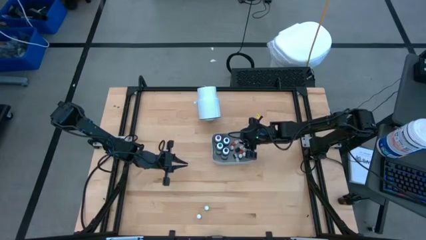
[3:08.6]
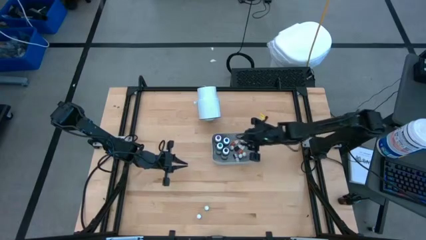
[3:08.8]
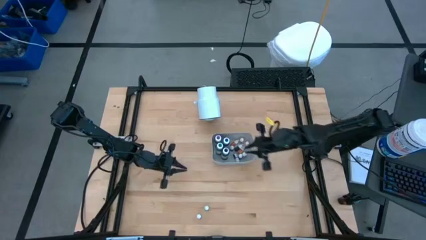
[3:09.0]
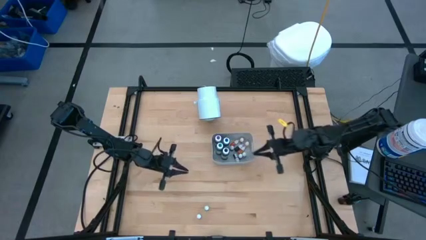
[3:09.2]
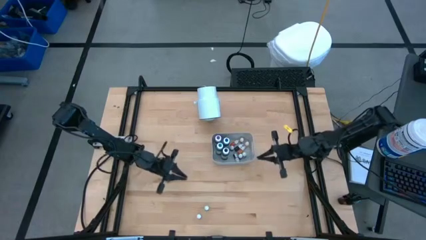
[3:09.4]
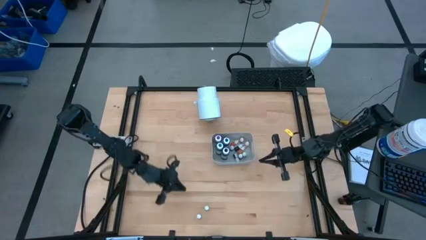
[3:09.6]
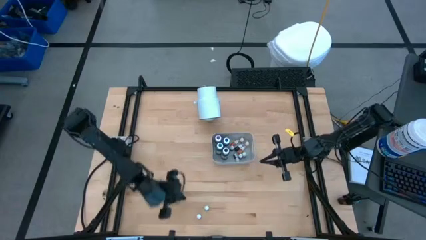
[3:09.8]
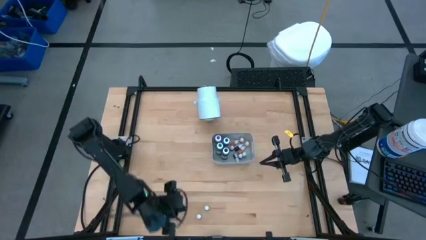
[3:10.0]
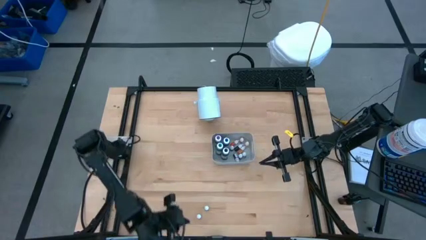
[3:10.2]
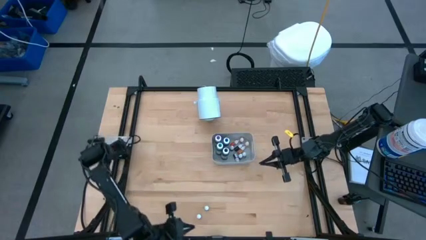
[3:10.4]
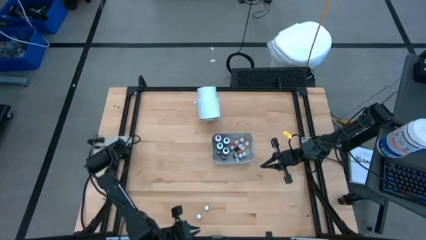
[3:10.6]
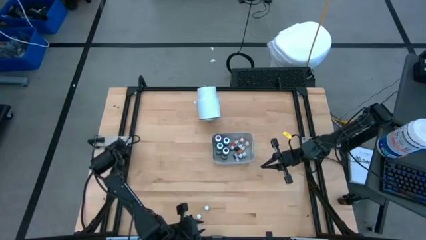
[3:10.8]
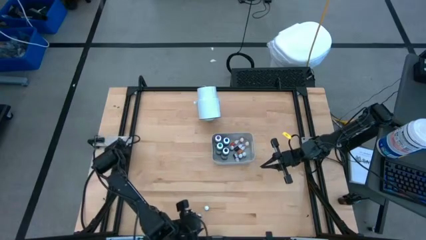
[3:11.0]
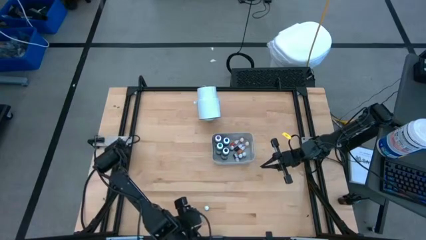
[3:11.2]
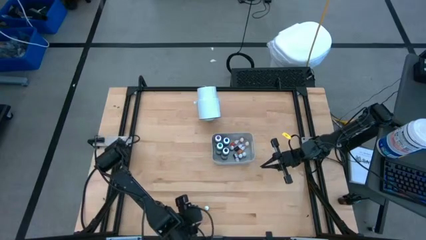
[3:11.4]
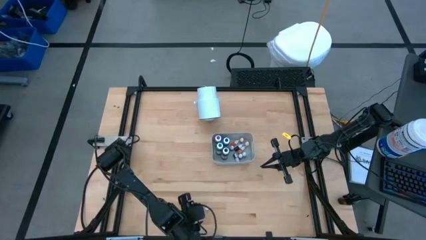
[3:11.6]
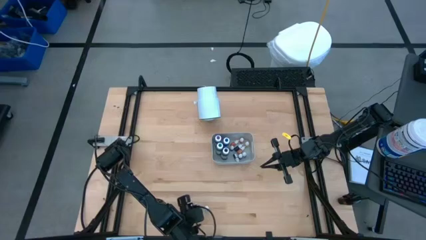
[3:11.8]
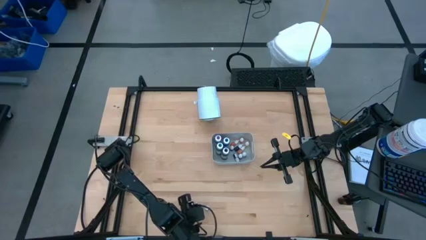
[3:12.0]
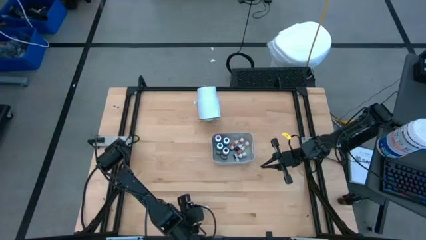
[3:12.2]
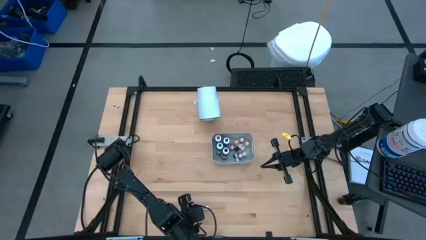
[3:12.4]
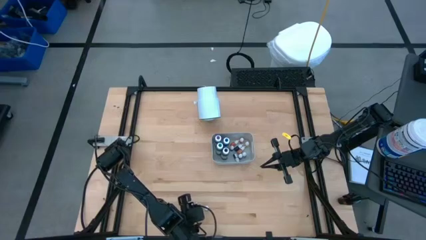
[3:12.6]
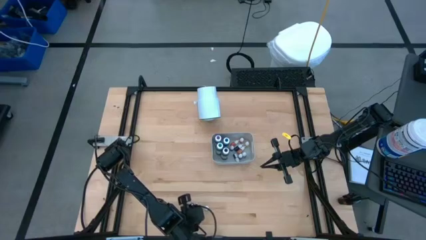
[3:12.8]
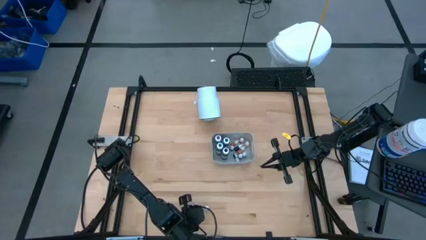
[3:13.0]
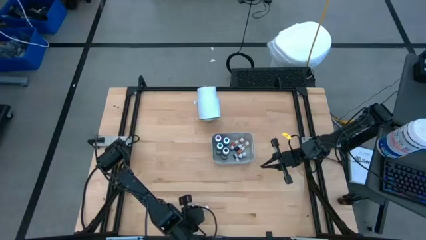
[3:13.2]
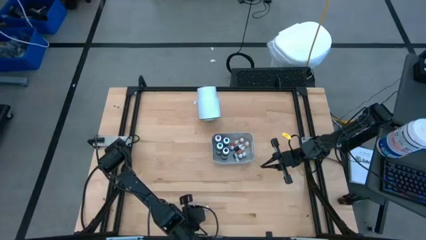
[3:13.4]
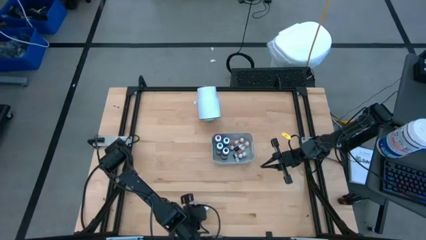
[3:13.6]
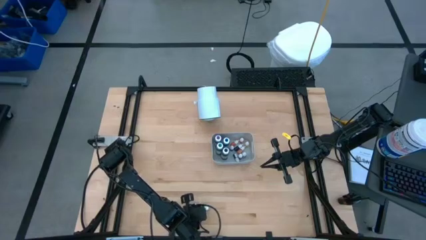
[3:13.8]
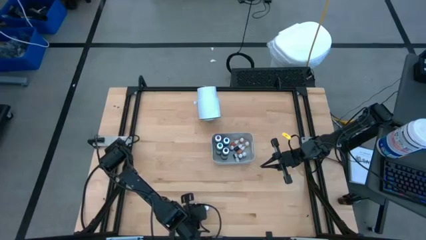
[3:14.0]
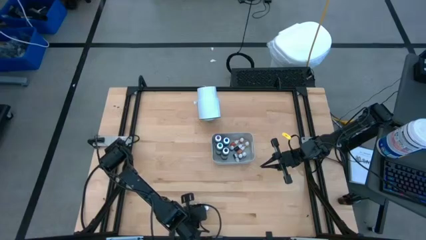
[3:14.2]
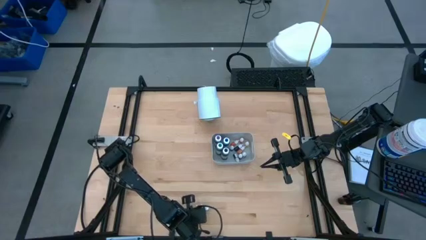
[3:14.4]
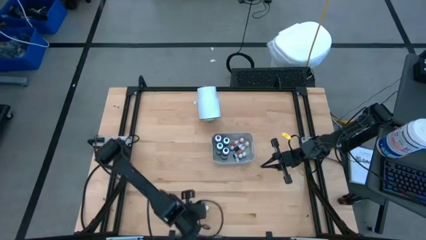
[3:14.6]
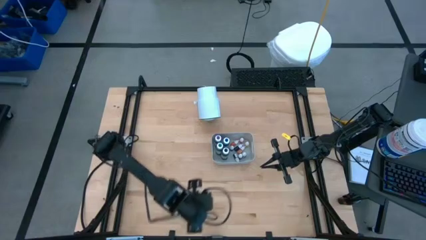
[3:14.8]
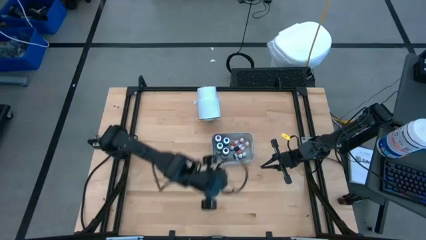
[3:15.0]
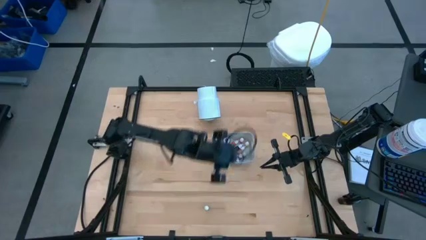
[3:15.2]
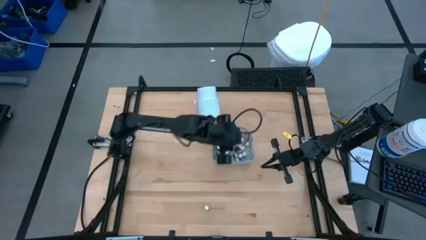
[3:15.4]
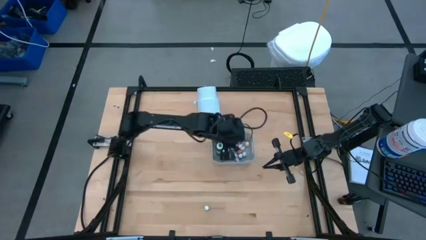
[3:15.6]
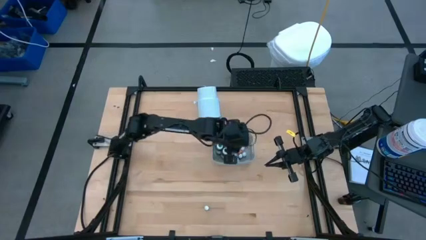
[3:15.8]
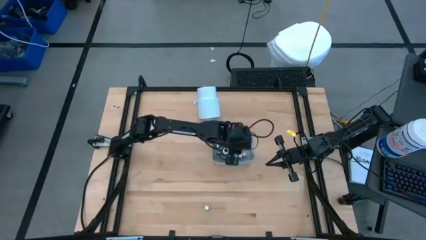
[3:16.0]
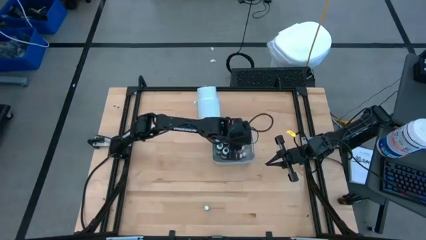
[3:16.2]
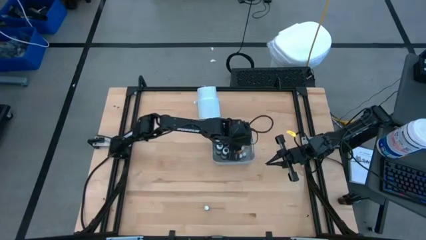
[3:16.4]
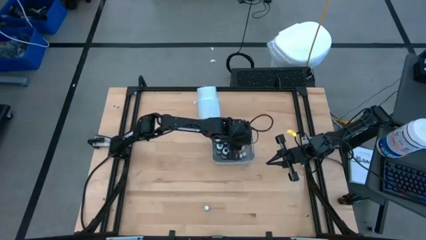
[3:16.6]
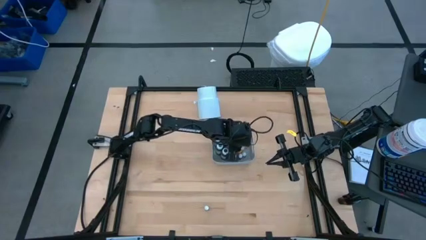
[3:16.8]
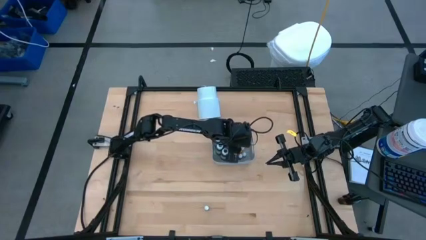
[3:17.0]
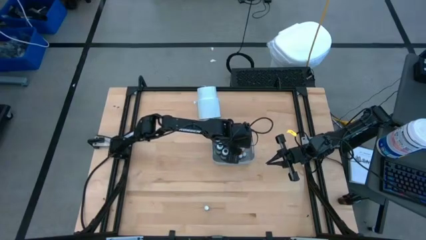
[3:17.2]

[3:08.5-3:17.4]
Task: Pick & Place food coloring
Put the red food coloring bottle into the gray bin

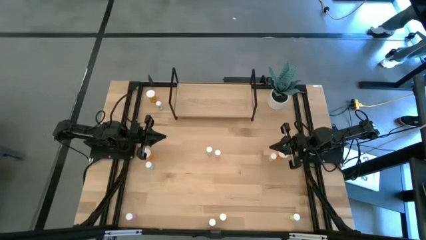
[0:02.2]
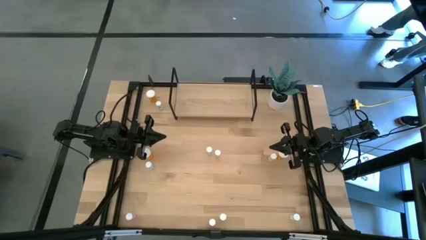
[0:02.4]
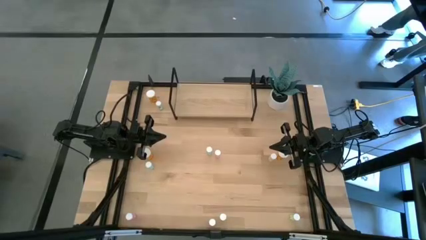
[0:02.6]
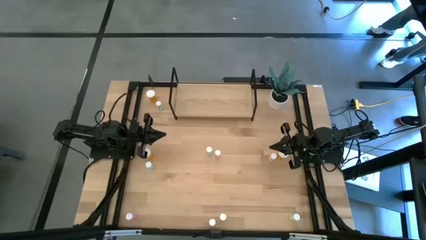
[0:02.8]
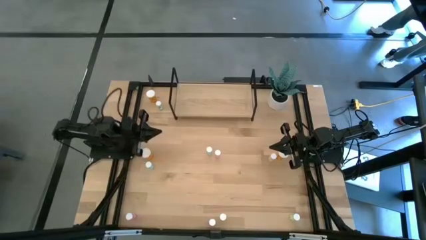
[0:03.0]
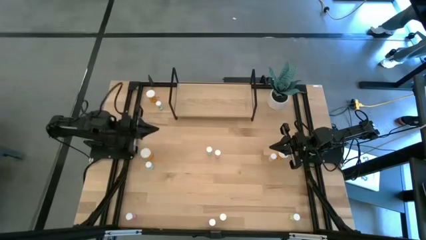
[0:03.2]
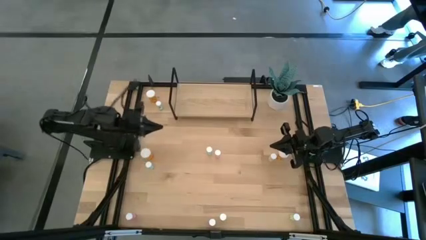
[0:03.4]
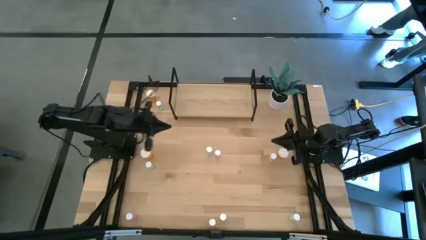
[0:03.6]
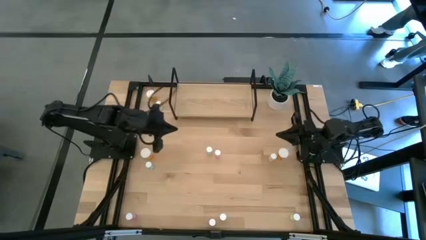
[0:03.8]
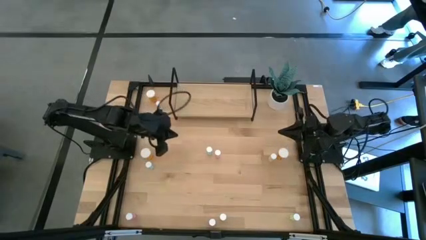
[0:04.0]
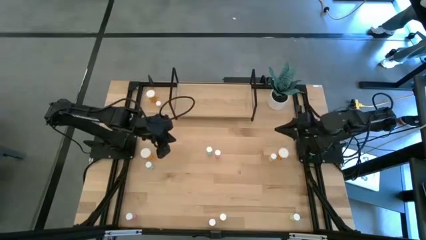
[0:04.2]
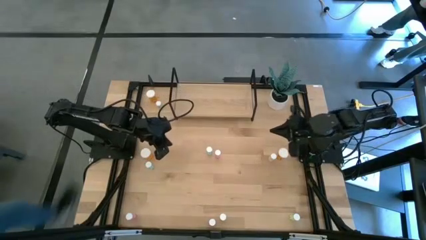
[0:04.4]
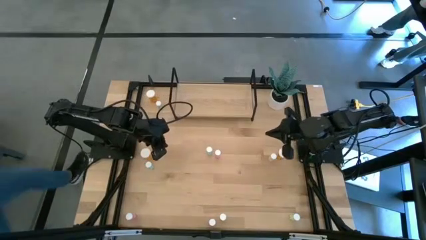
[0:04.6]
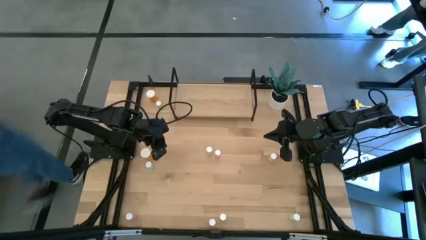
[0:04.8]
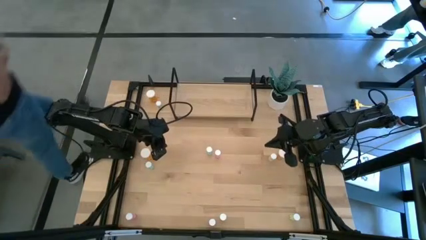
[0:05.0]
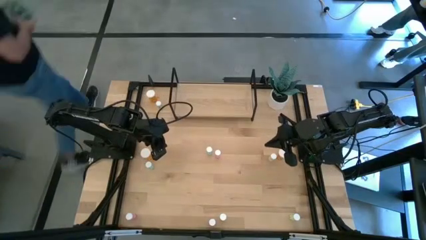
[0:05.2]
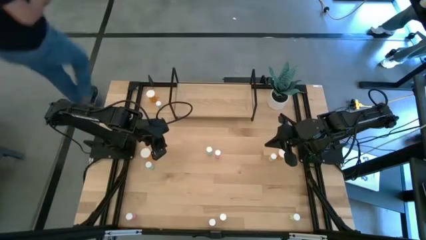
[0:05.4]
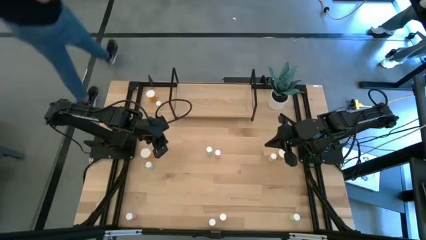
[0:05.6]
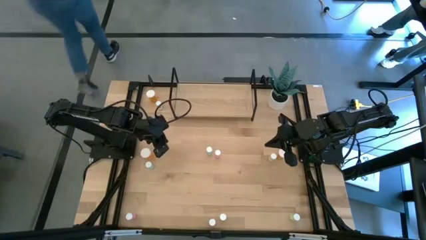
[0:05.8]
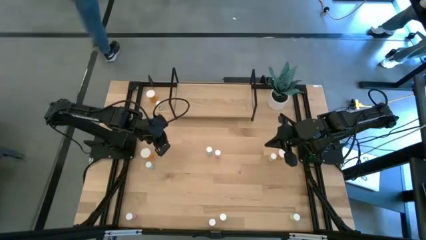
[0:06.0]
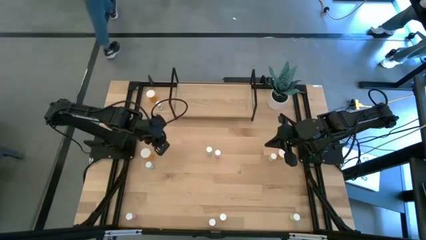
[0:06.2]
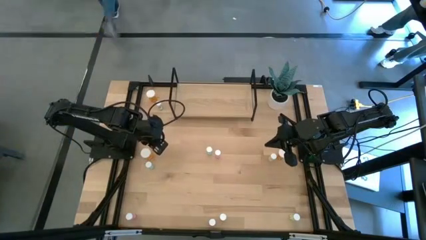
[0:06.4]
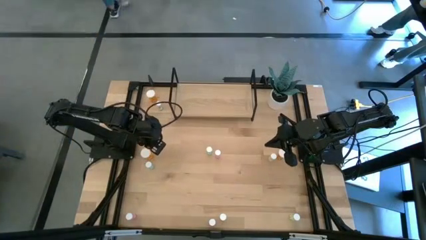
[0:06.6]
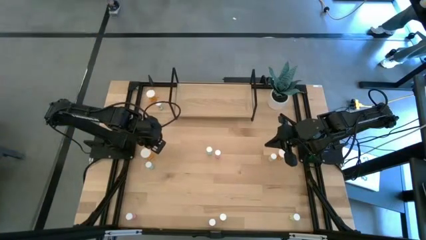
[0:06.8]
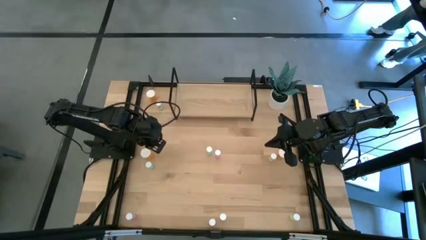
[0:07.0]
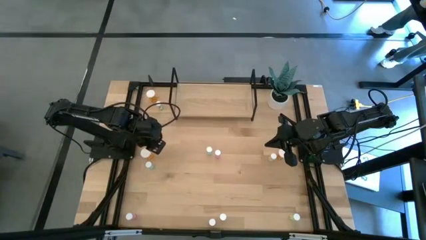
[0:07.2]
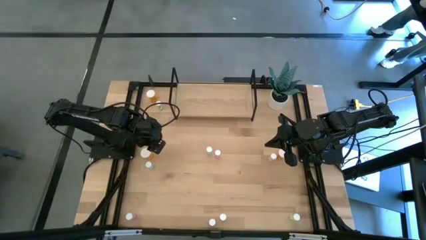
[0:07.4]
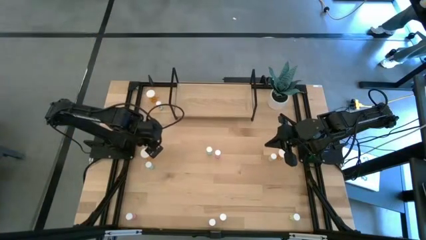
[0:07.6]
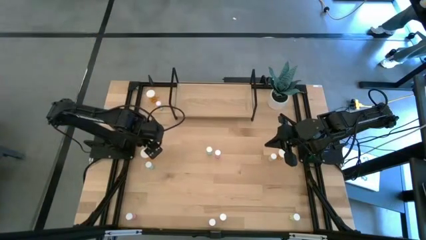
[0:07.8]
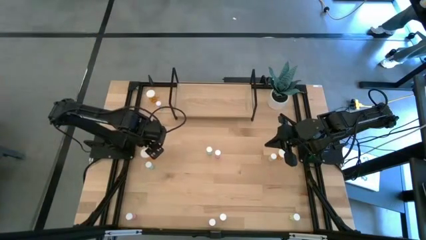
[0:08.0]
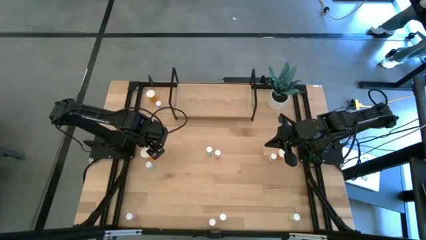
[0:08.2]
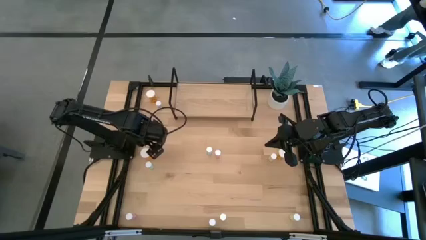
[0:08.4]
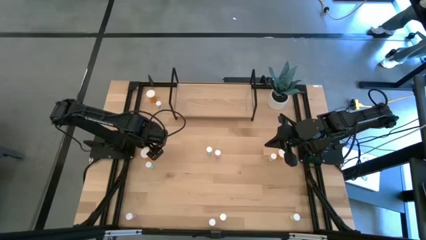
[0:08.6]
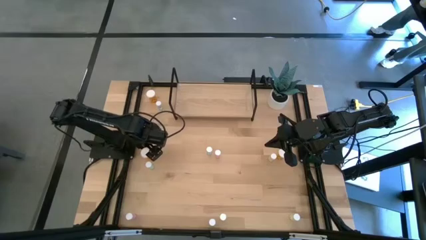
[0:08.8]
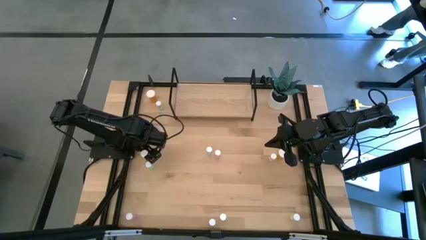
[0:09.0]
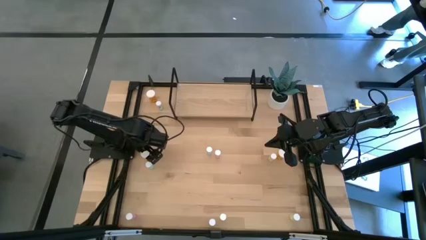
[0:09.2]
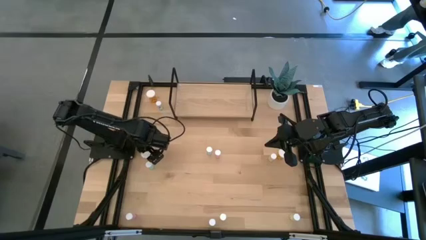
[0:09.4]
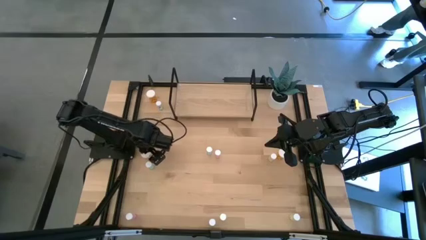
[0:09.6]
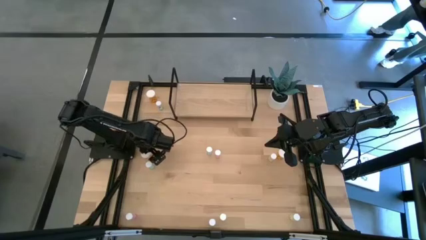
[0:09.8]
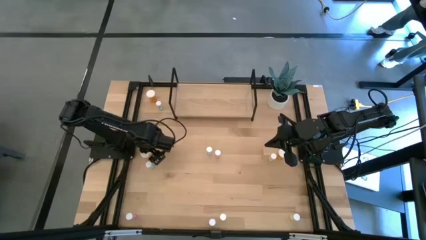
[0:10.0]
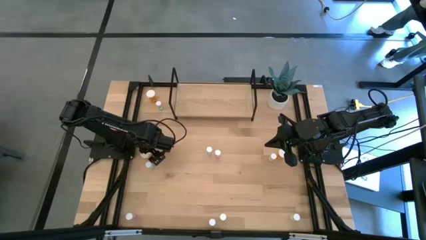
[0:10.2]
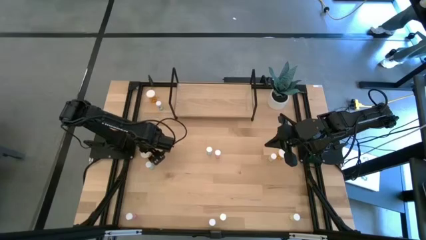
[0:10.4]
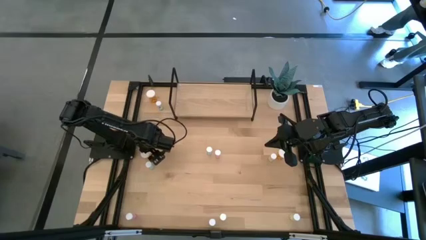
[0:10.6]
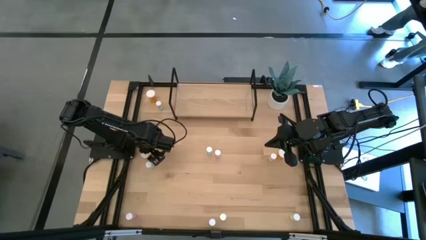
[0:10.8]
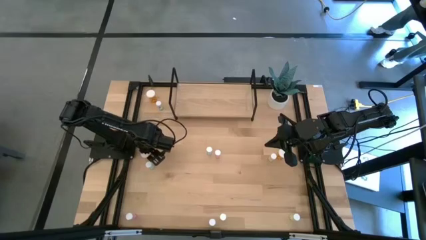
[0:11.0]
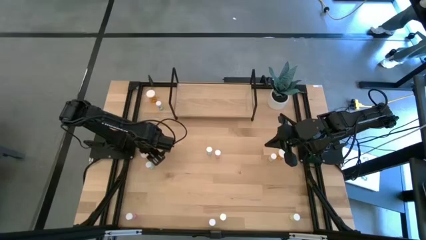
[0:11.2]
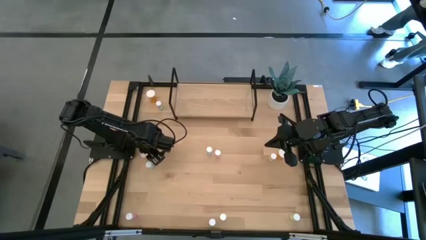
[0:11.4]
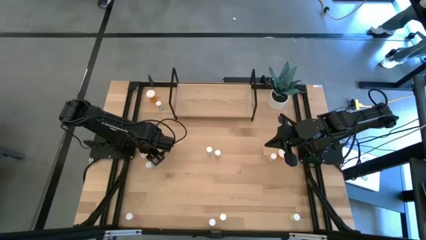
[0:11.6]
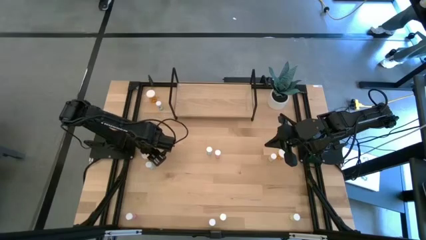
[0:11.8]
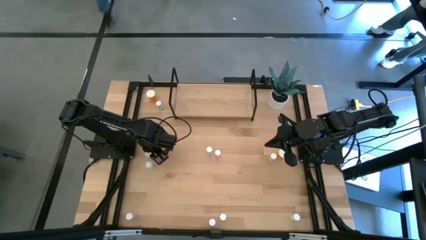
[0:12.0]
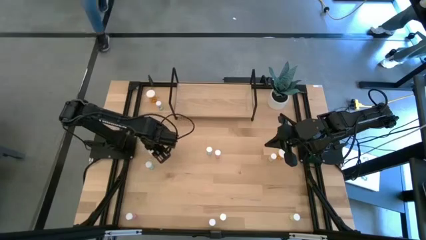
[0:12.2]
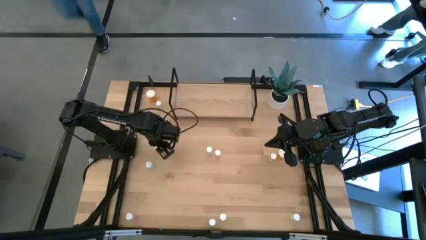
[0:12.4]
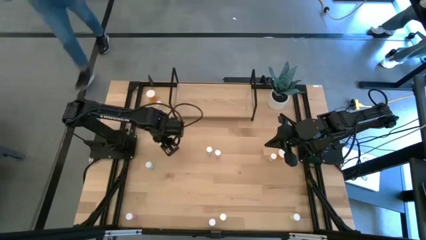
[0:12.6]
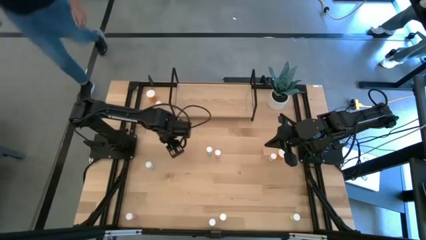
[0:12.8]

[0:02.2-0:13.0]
Task: Pick and place medicine bottles onto shelf by color
Put the bottom left orange pill bottle on the shelf
